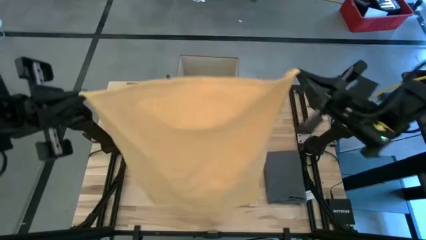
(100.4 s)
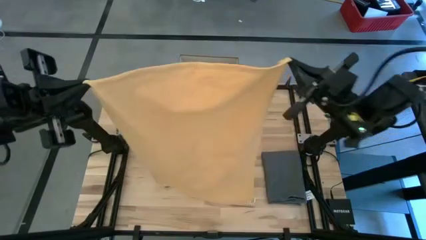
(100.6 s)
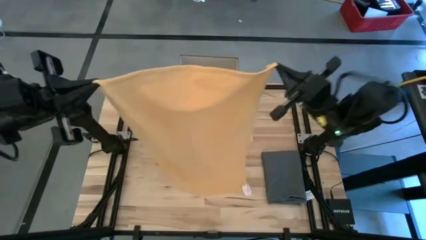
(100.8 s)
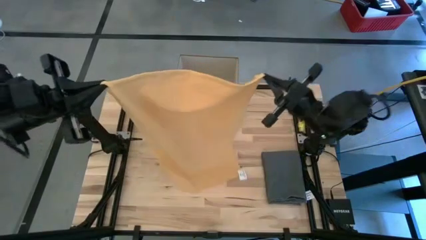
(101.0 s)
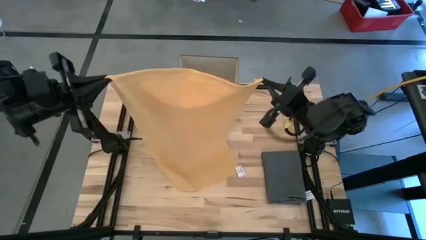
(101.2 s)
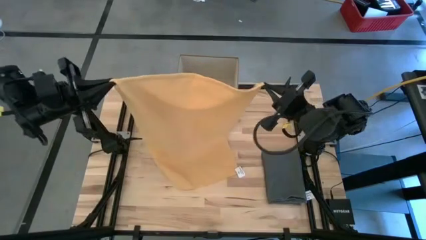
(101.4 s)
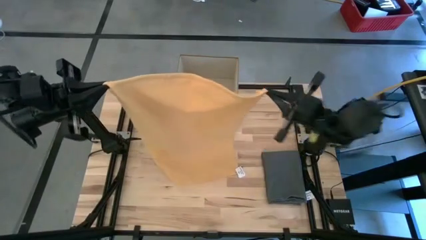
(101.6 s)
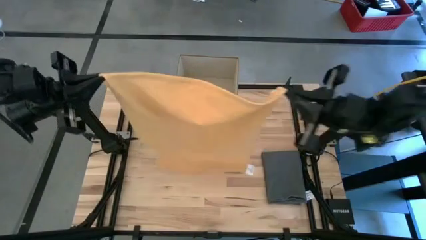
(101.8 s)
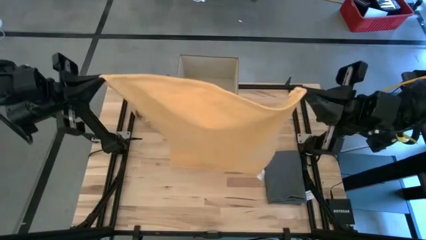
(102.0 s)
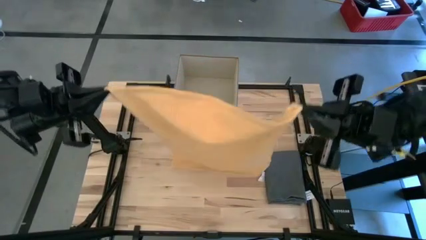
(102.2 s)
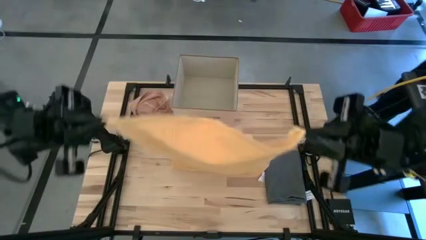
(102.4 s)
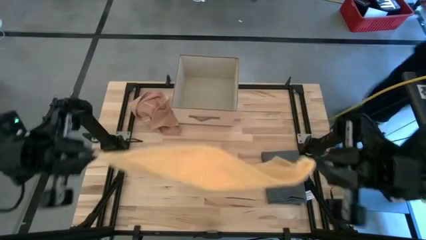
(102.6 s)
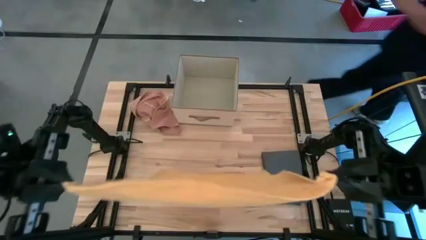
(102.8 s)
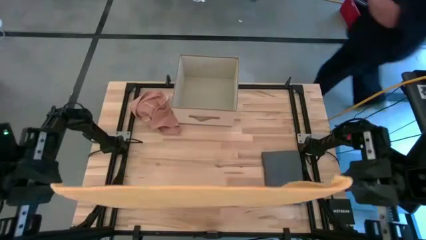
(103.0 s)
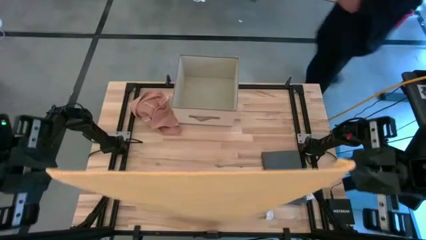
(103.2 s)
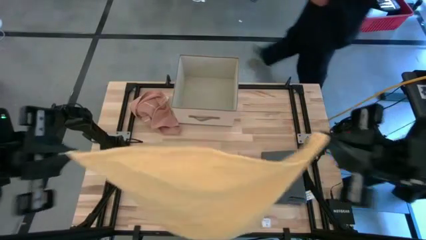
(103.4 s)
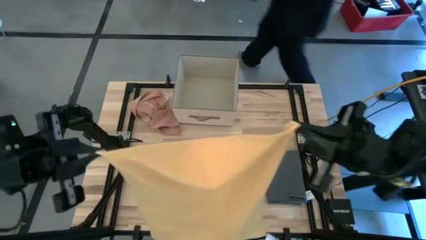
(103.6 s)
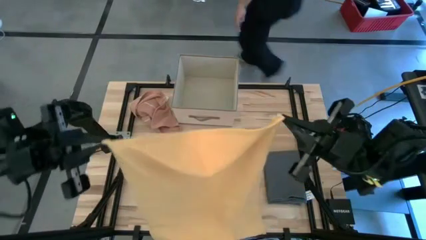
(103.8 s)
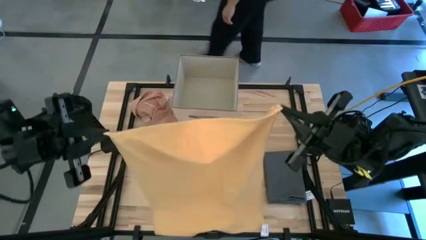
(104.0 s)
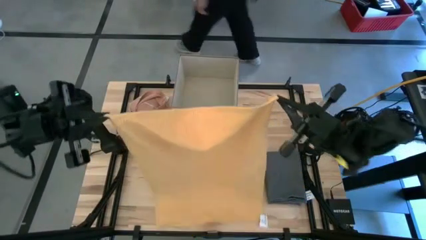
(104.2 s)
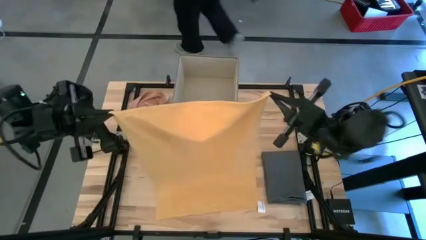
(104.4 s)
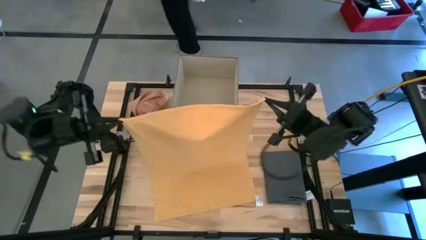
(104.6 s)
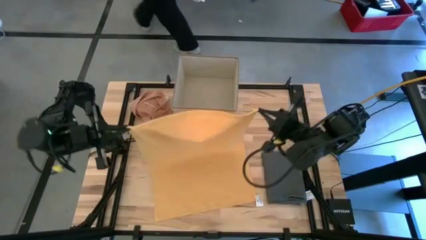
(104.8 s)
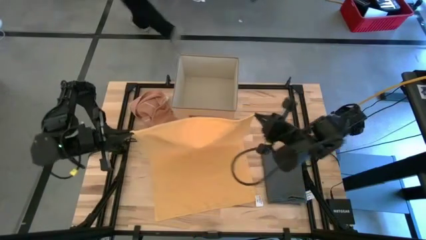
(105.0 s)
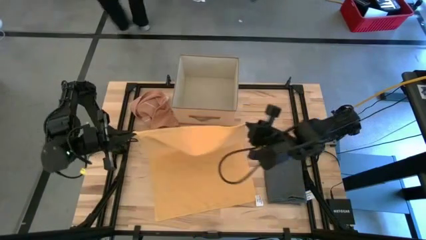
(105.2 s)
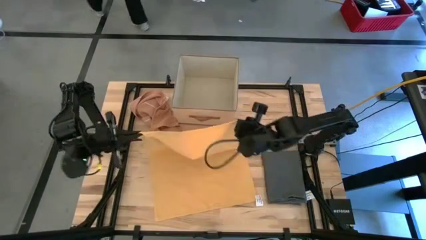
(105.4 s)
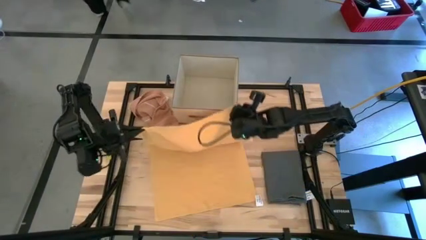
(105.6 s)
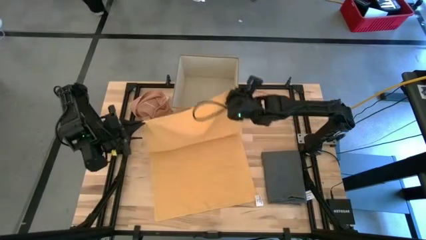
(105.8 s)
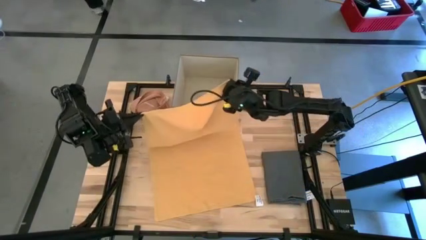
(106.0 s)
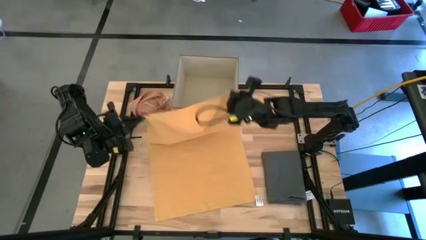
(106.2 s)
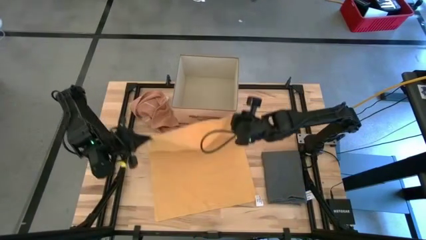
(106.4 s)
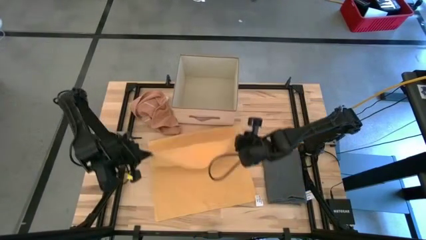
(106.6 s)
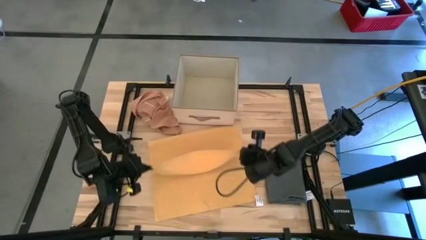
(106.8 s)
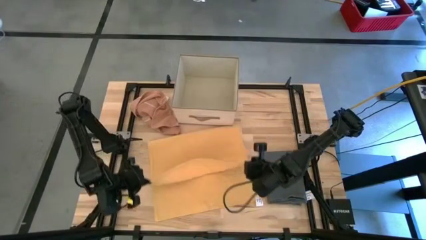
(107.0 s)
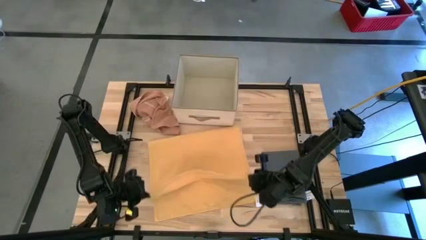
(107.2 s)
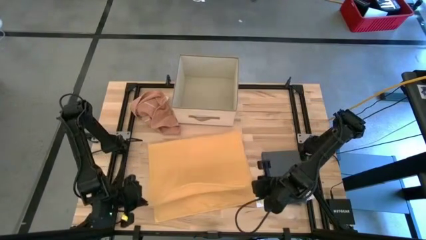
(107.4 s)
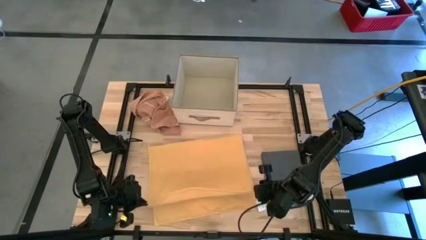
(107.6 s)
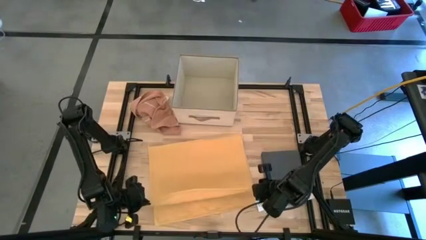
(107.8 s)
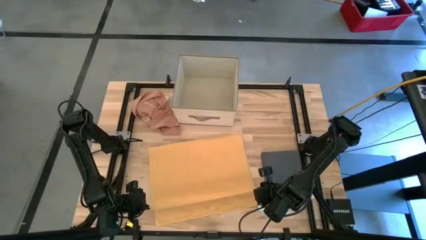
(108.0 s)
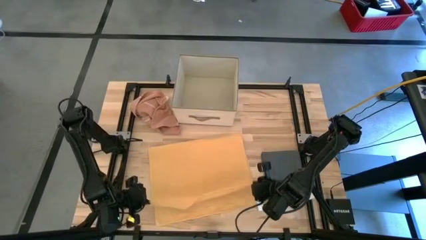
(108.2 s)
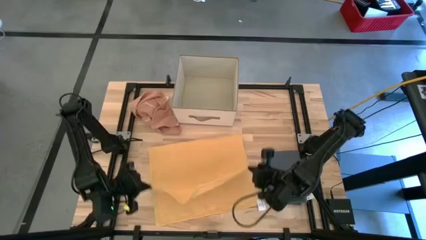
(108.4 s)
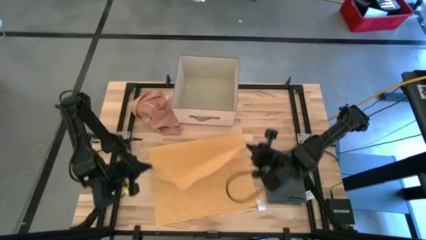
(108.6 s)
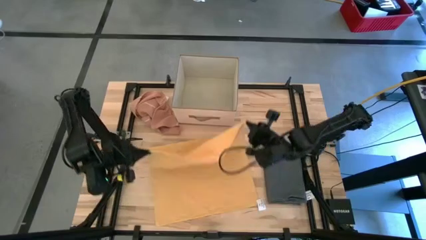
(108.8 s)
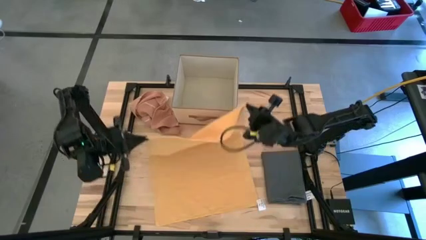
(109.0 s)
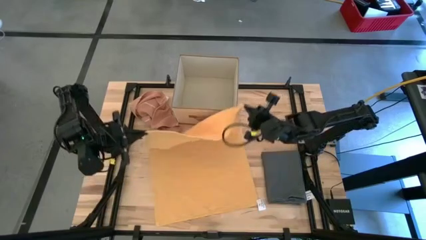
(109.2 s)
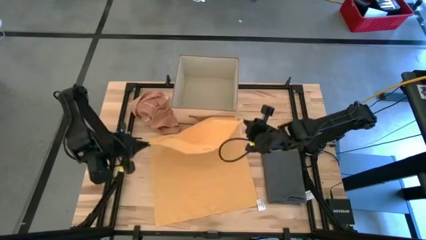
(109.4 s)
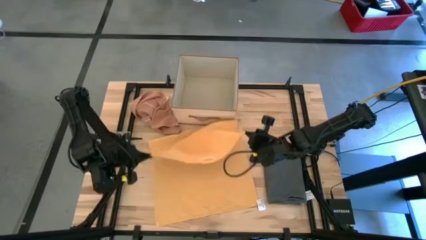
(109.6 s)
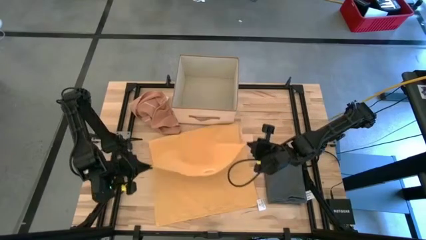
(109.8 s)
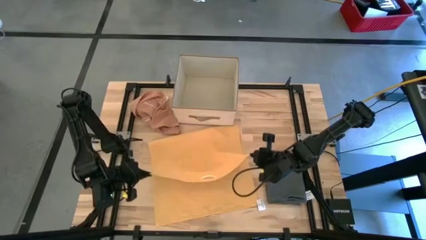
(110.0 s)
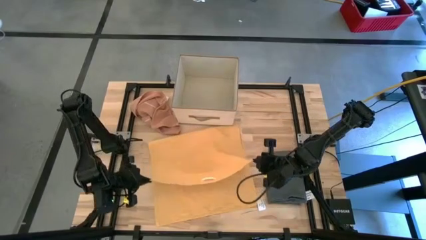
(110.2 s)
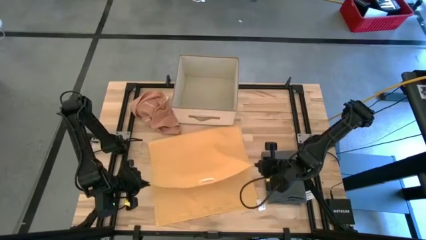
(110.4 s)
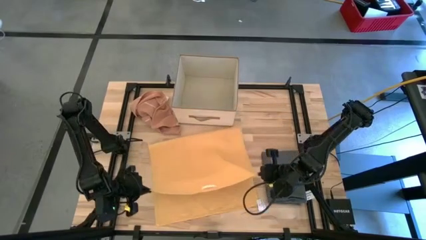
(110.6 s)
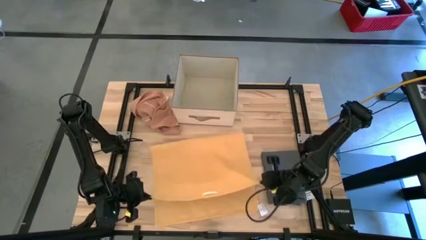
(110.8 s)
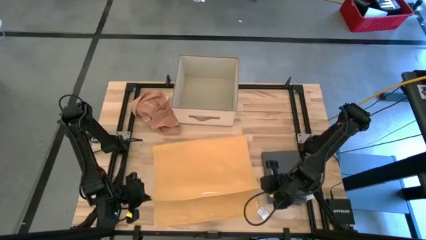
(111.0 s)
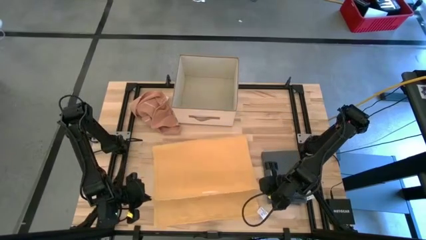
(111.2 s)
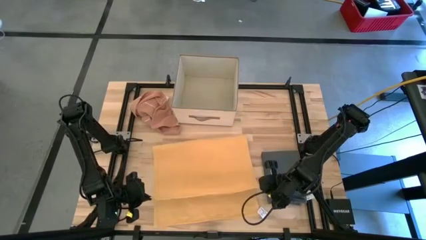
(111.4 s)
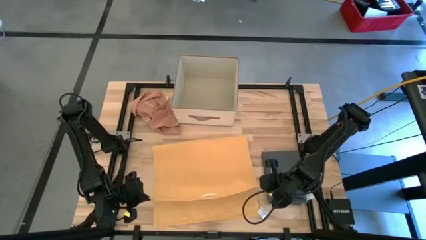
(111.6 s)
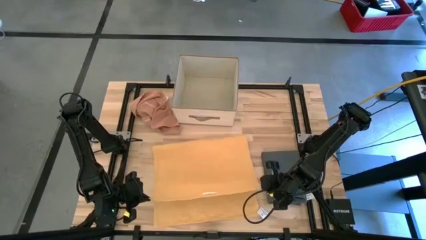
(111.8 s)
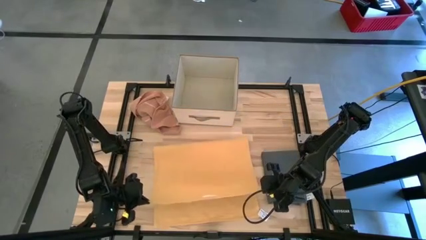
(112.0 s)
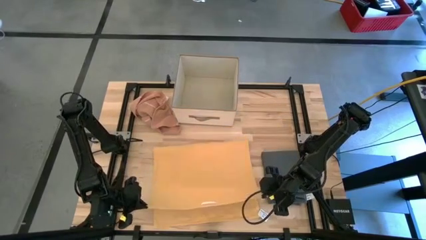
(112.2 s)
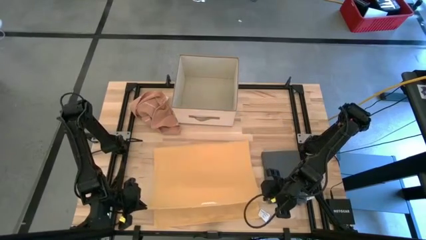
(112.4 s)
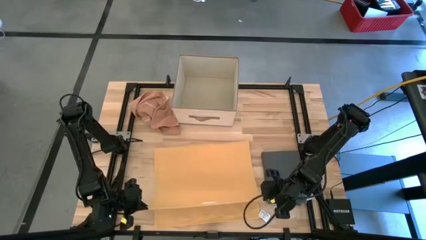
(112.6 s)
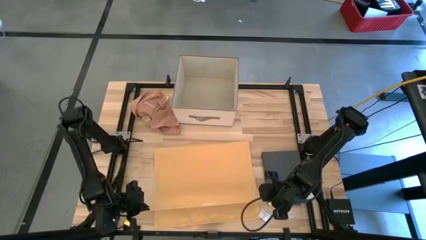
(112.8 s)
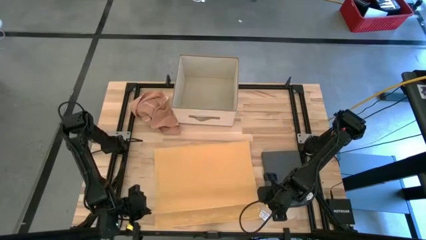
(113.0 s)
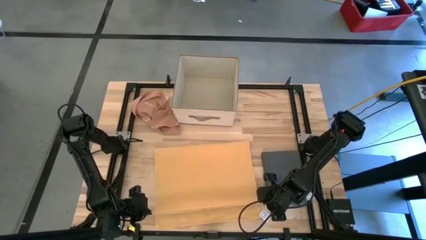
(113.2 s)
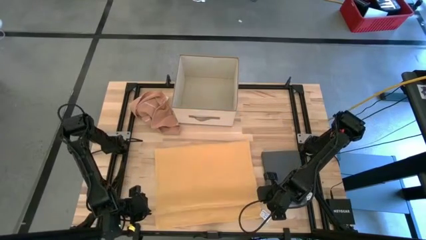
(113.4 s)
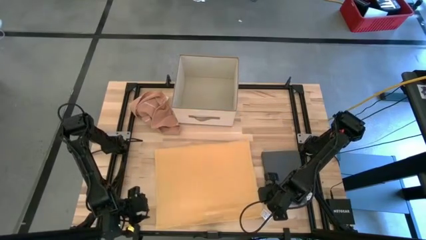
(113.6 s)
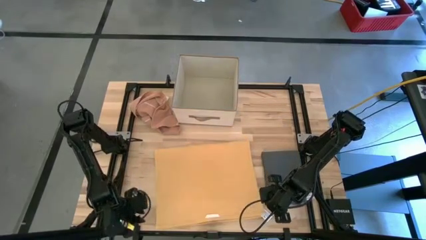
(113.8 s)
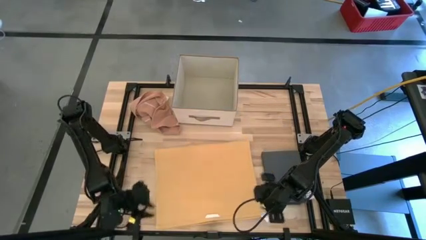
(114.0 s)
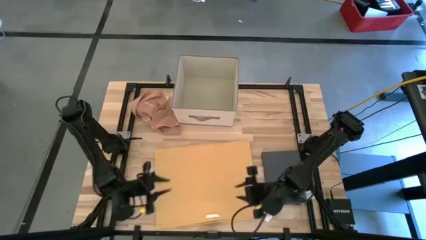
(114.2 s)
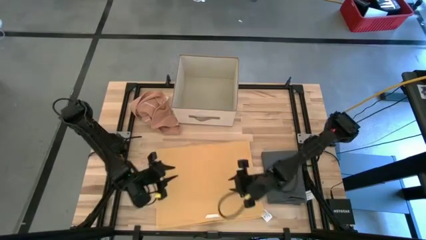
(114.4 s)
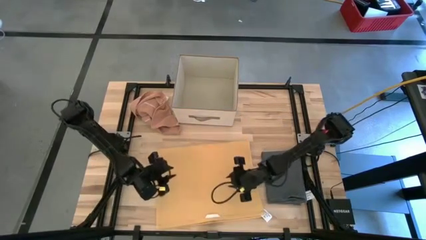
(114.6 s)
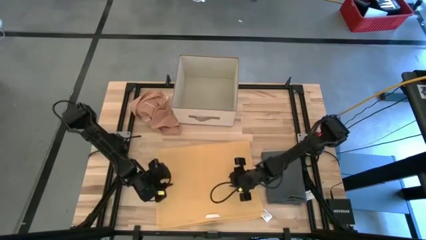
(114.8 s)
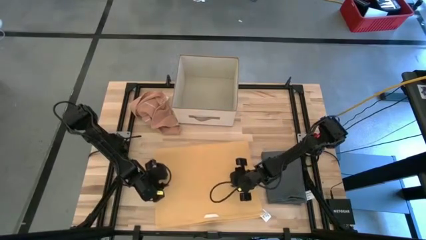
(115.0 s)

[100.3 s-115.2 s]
Task: Fold towel
Fold the yellow towel
